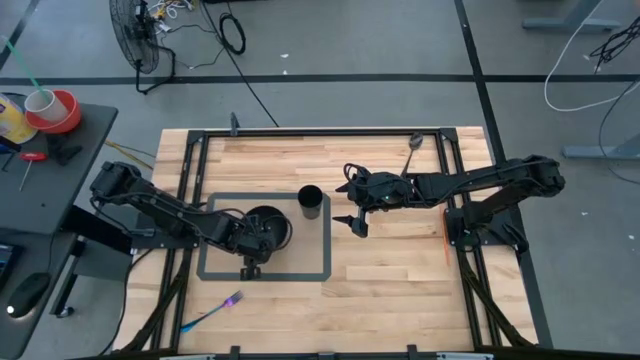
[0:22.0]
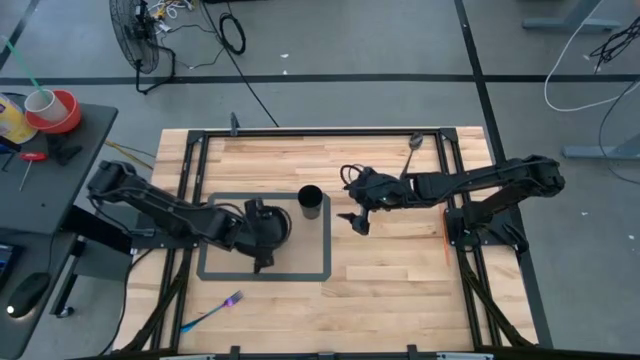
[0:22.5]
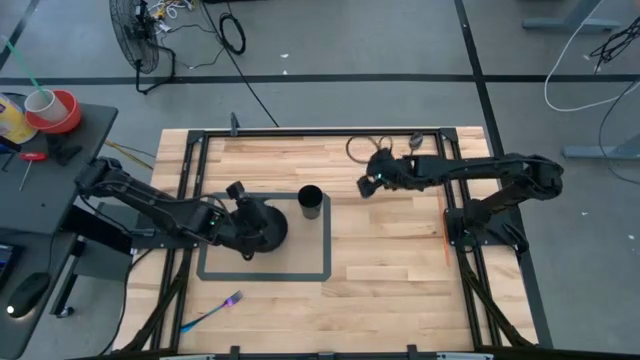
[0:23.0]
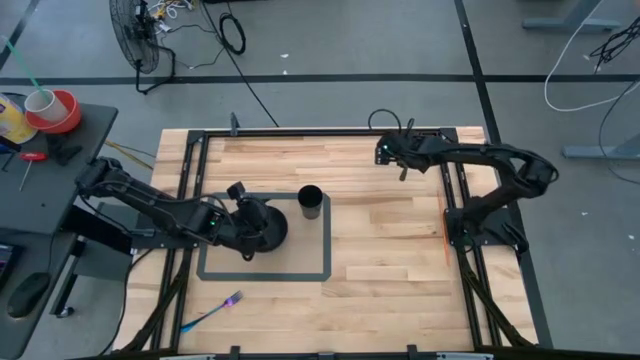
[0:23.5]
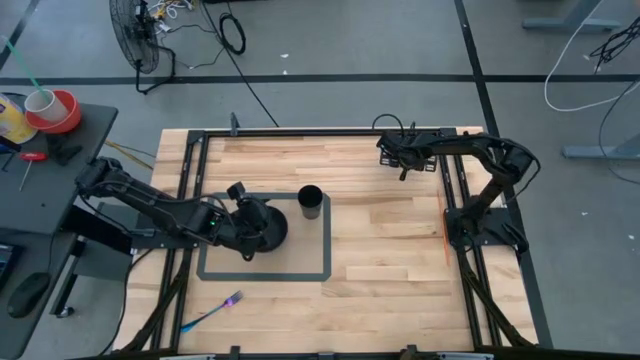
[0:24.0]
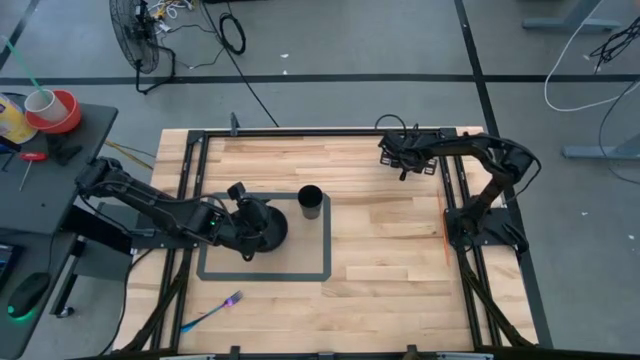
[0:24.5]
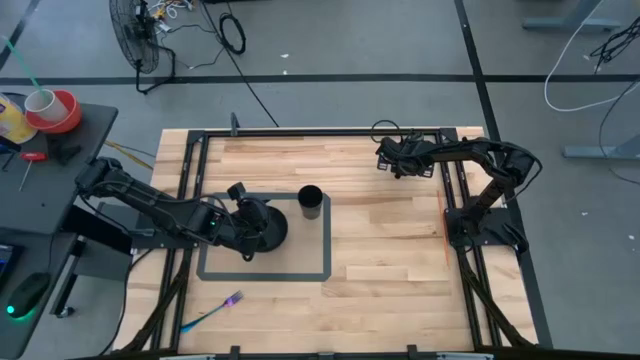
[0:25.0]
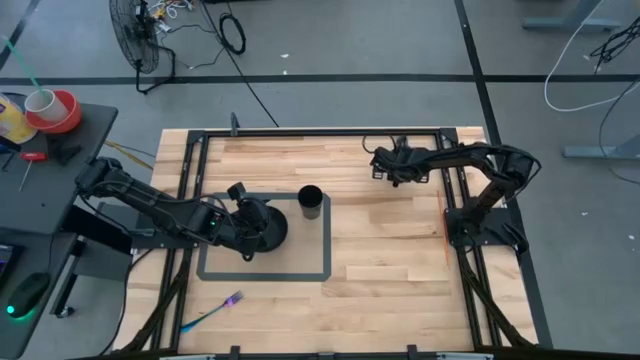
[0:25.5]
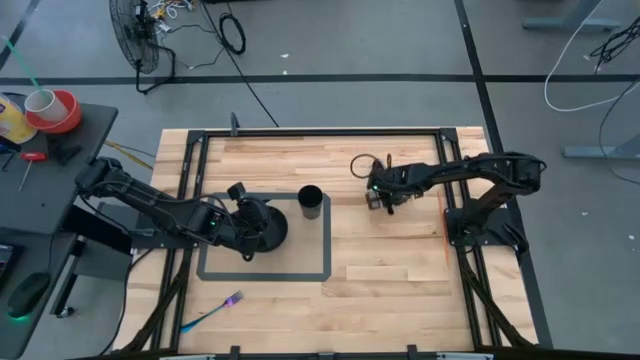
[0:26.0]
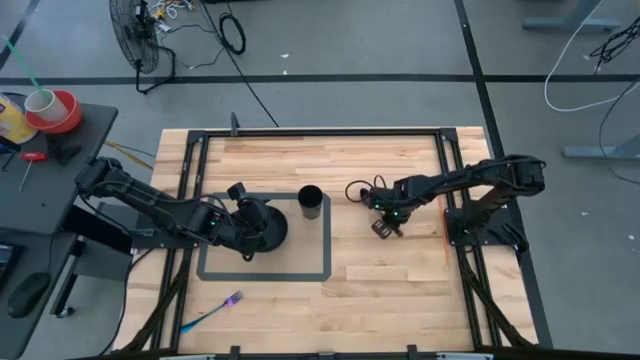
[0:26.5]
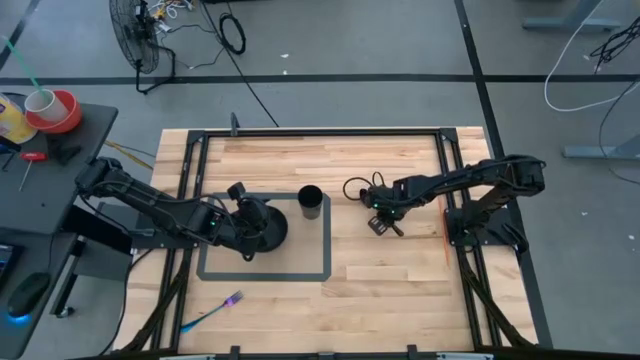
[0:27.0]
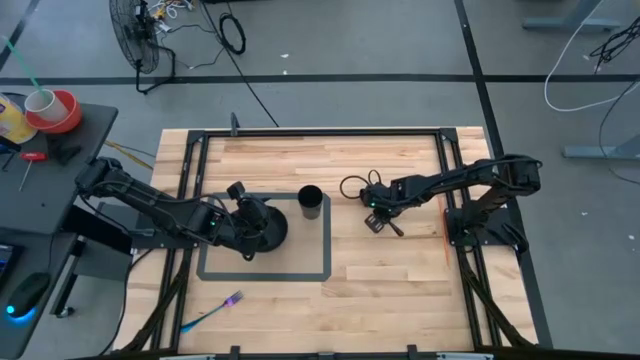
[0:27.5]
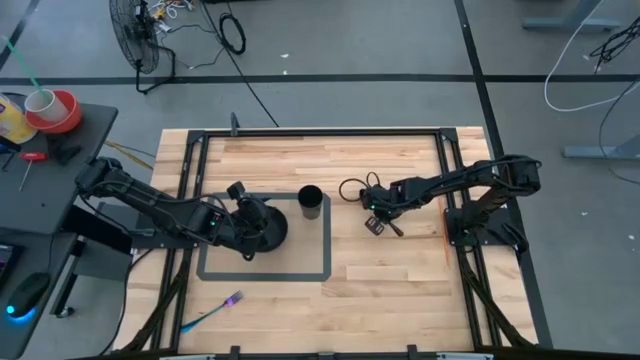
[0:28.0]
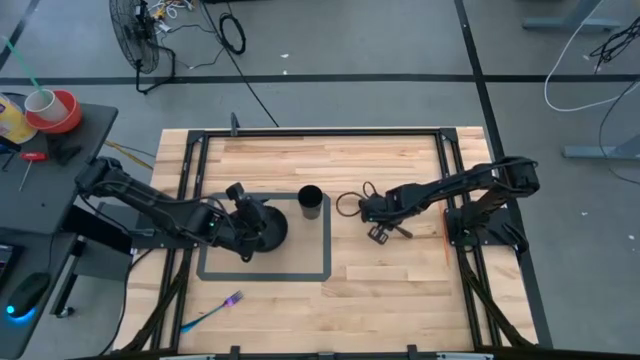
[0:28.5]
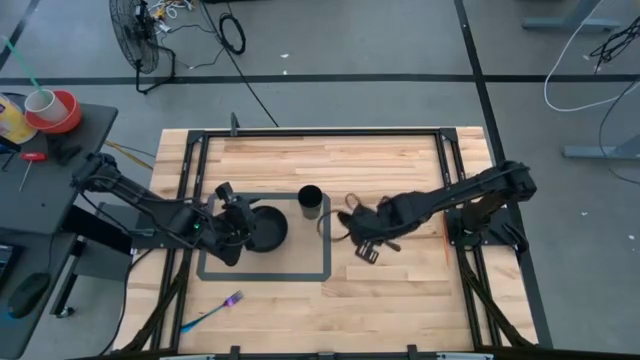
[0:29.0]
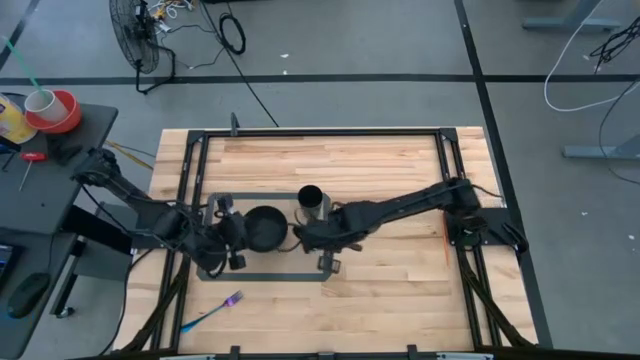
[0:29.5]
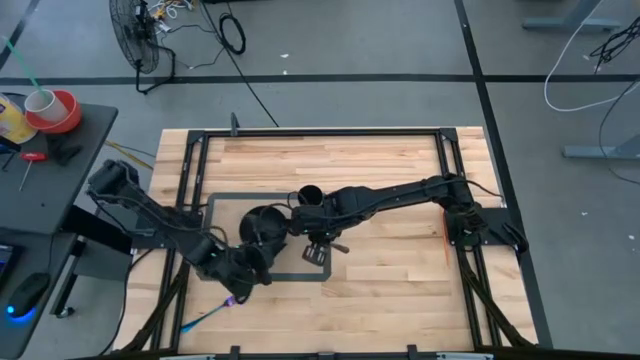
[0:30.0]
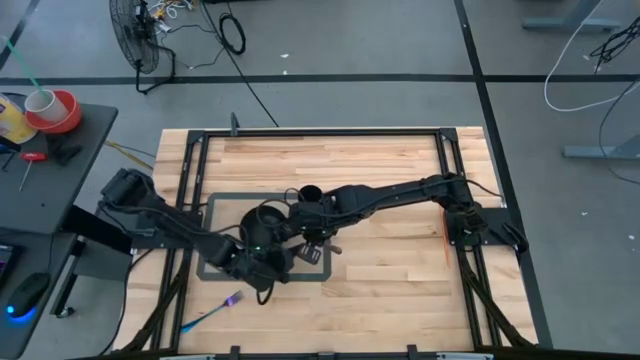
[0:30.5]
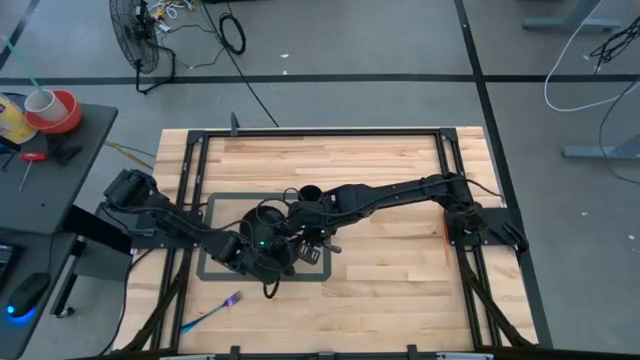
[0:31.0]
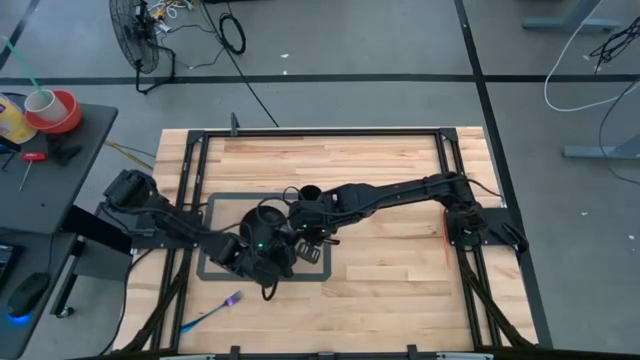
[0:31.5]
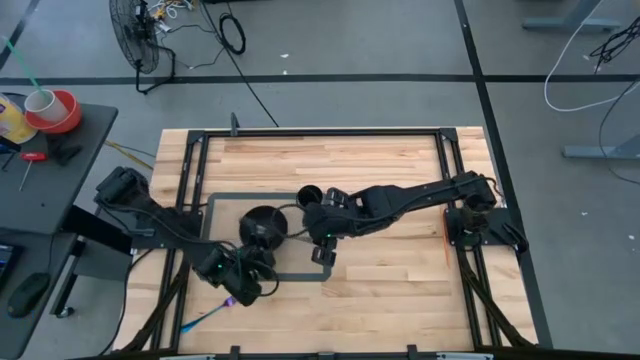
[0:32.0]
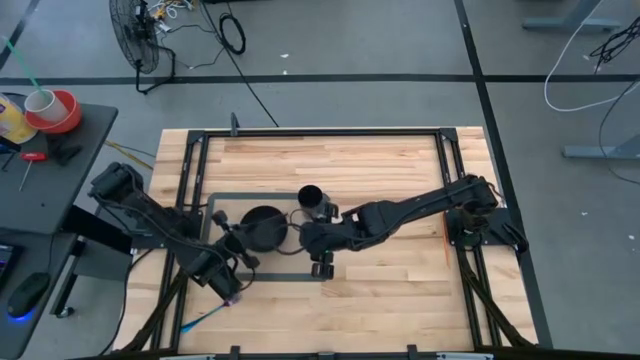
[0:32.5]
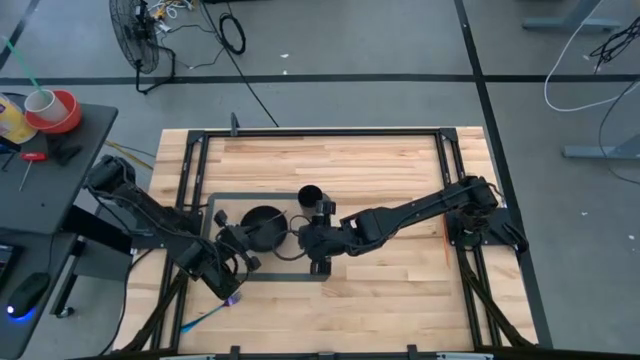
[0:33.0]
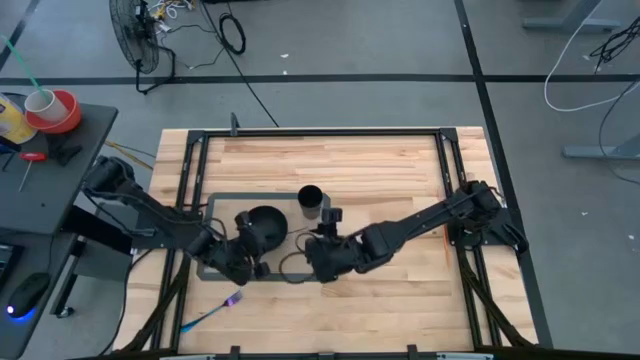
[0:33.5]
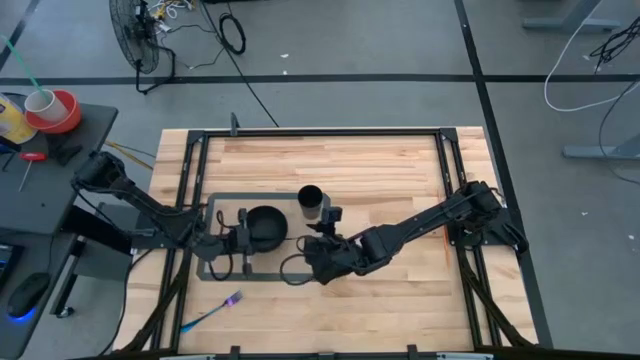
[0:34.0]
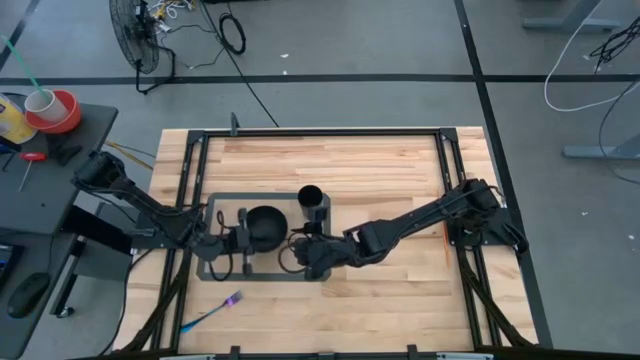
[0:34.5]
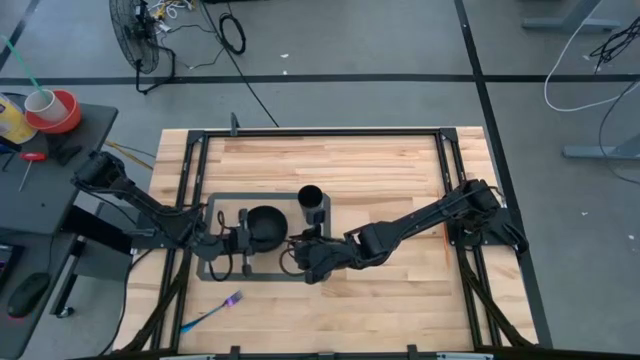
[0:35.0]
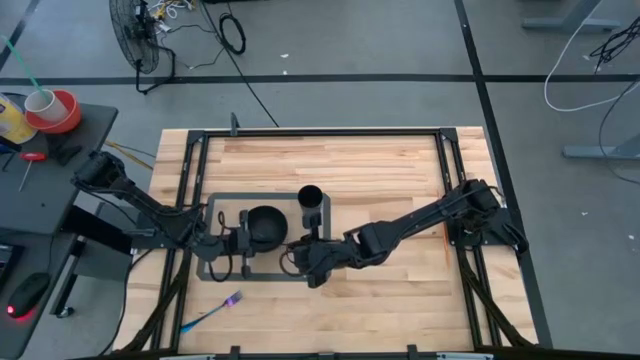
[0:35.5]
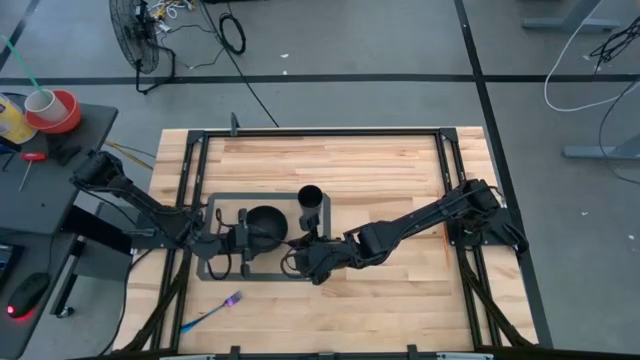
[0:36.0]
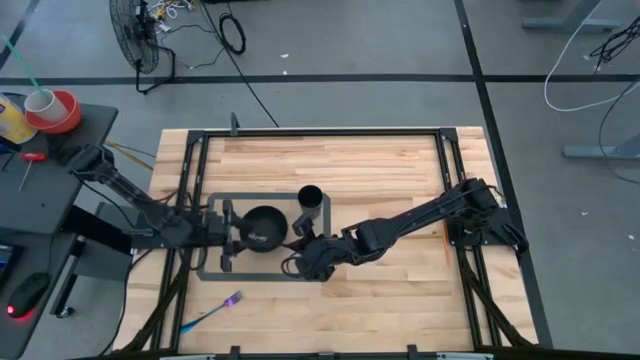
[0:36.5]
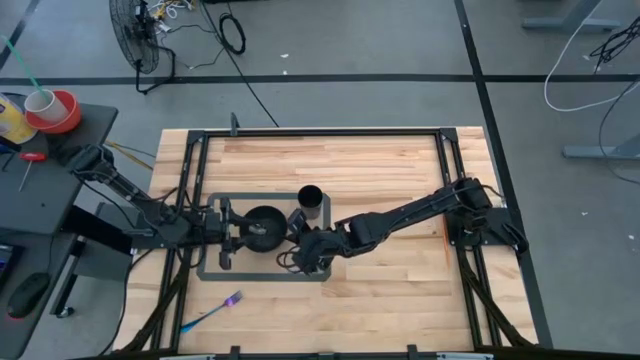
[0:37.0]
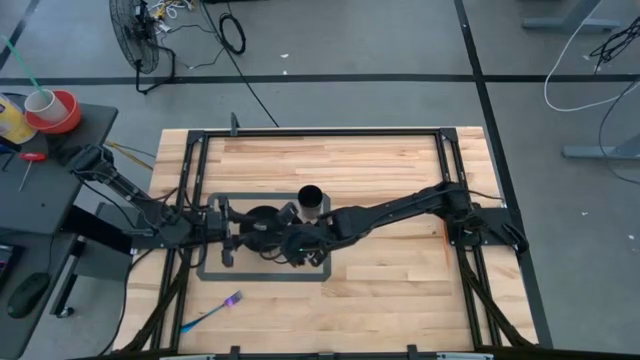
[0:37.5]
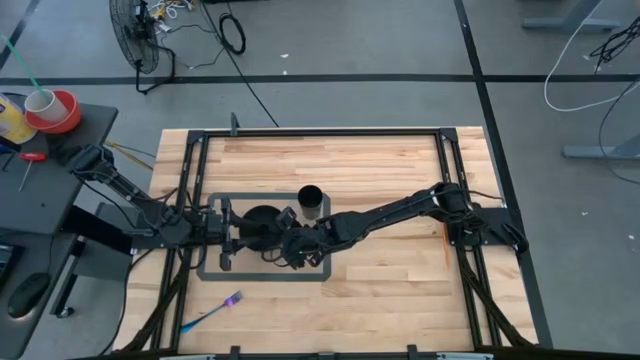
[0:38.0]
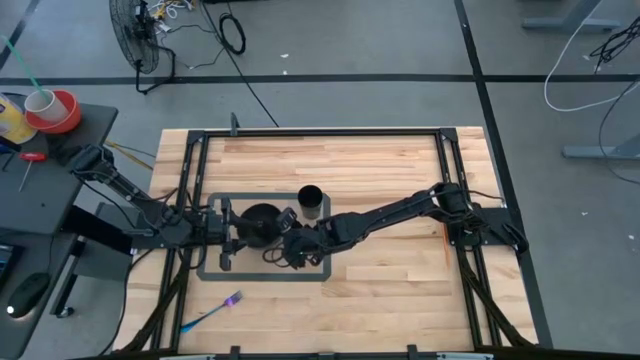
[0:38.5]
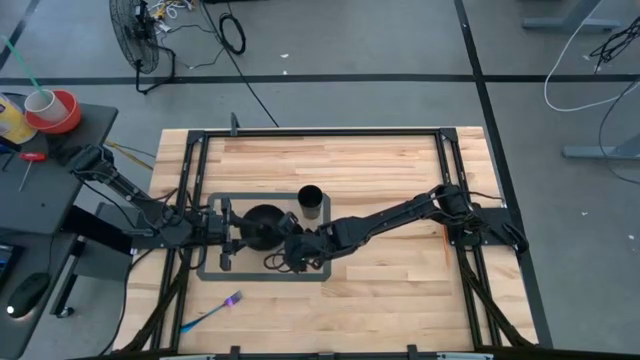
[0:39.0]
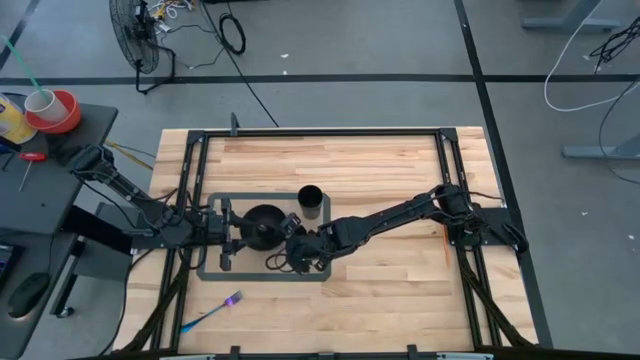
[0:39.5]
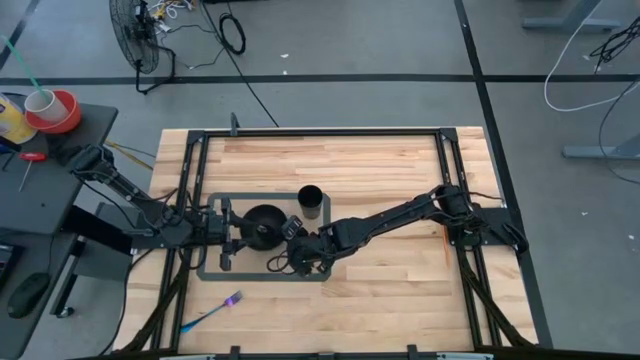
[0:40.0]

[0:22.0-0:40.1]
Task: Pick & Place Utensil
Put the black spoon into the black bowl

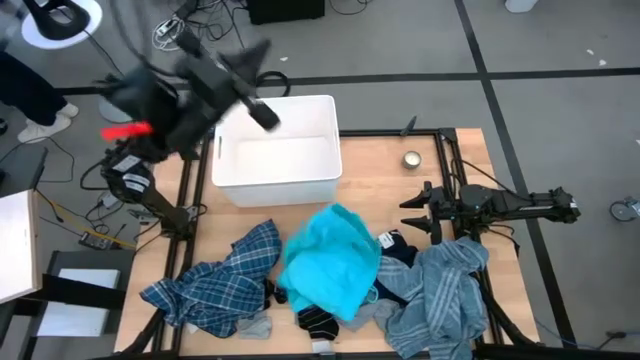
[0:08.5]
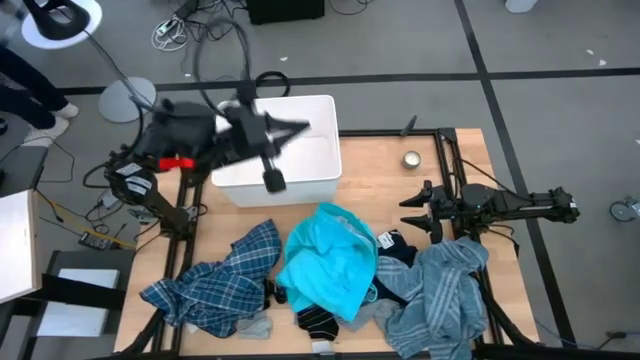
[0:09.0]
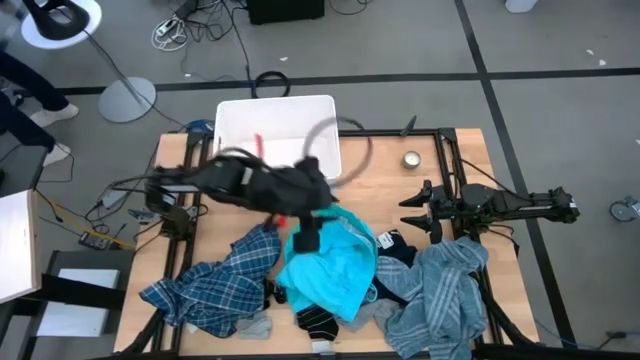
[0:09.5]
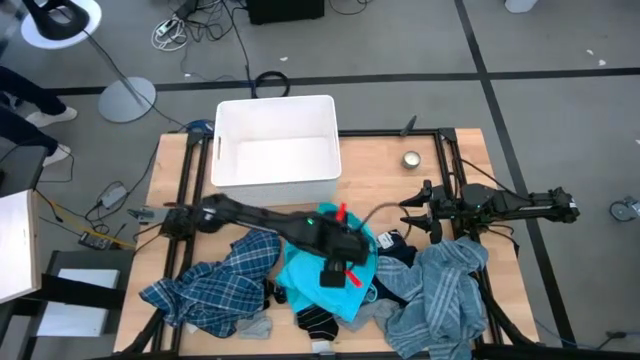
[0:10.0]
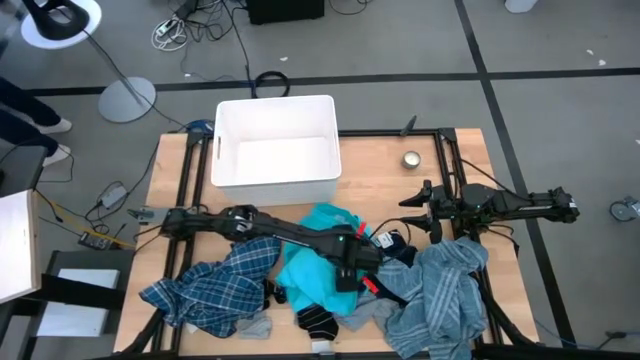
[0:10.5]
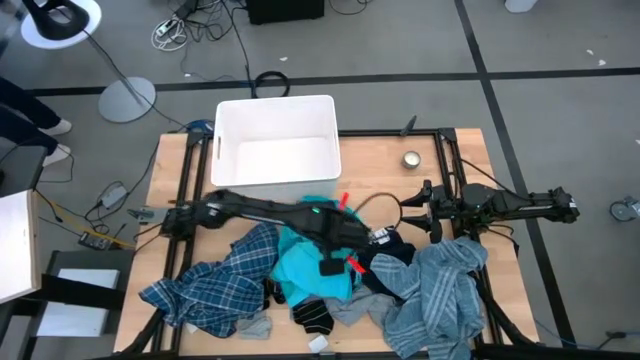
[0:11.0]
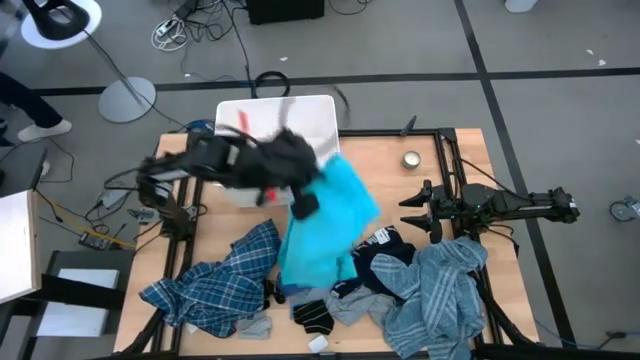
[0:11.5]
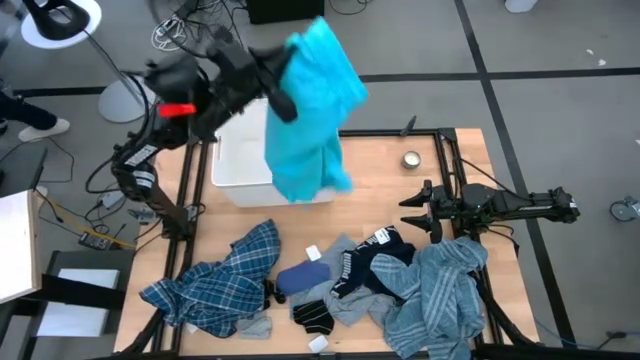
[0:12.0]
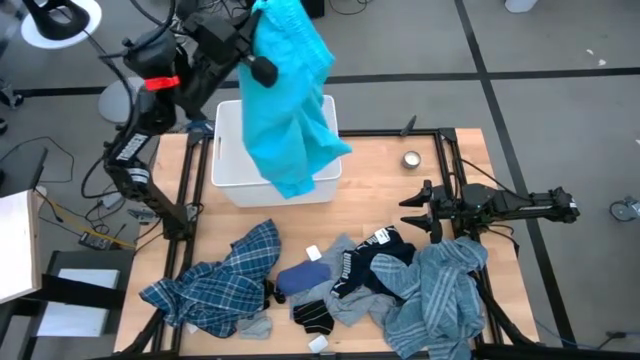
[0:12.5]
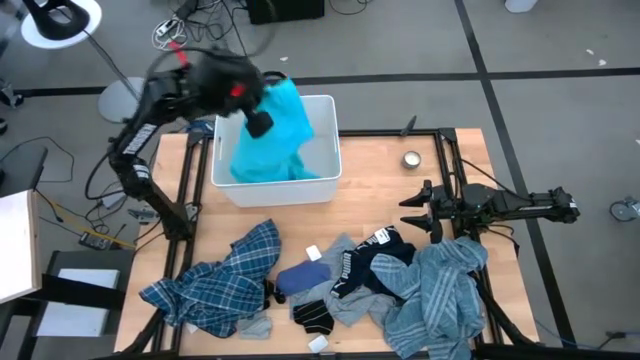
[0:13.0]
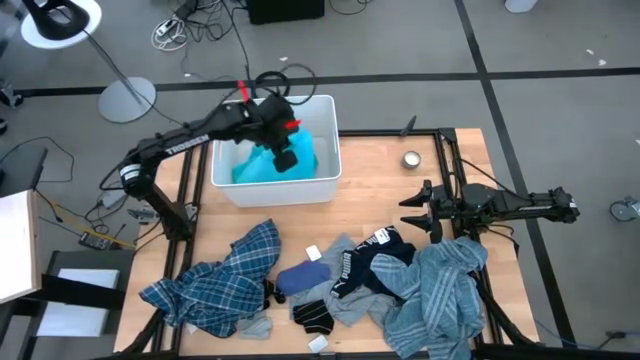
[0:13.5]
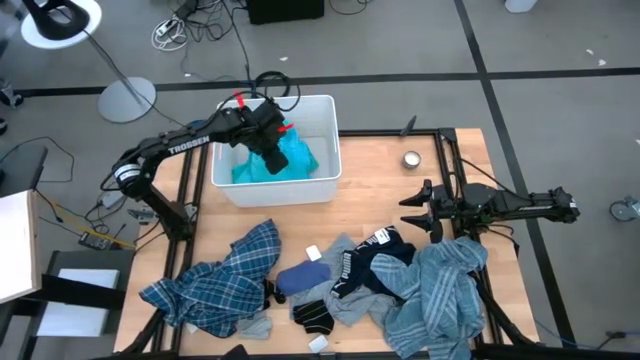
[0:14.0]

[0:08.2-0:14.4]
Task: Sort clothes
Put the light blue shorts into the white laundry bin
